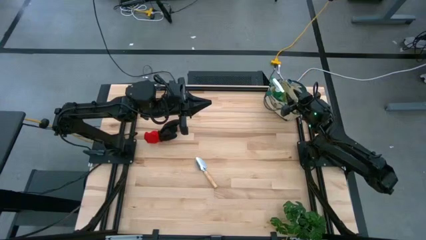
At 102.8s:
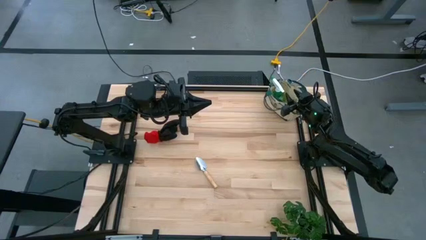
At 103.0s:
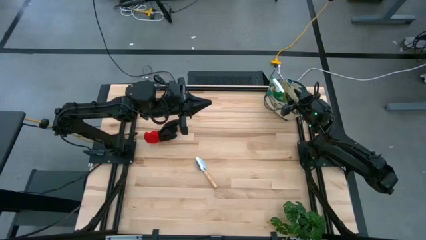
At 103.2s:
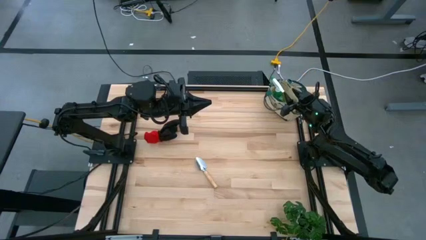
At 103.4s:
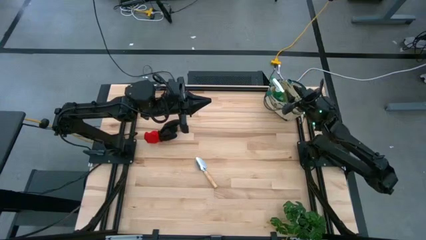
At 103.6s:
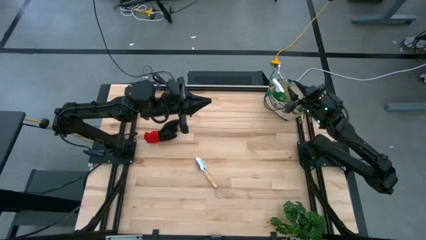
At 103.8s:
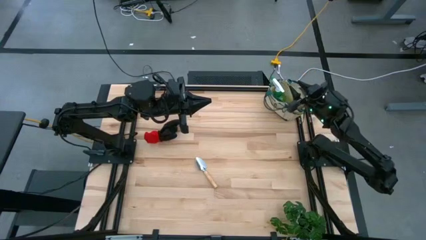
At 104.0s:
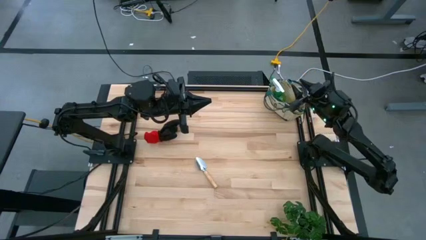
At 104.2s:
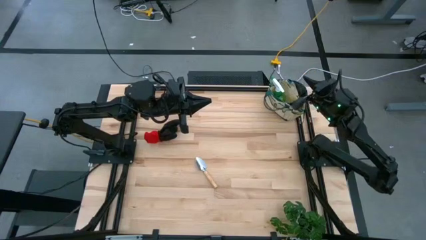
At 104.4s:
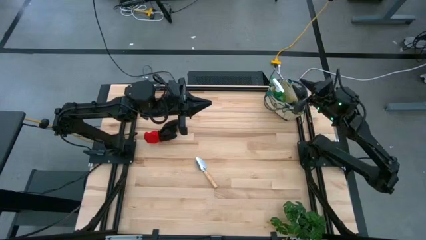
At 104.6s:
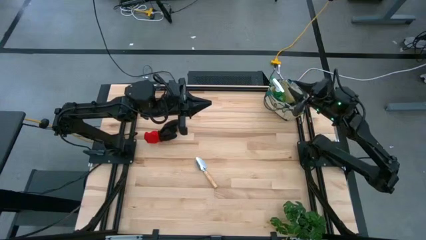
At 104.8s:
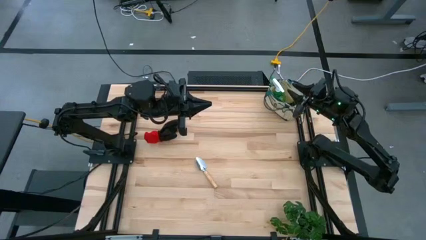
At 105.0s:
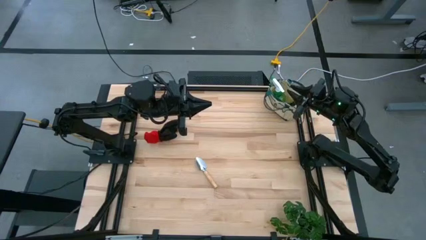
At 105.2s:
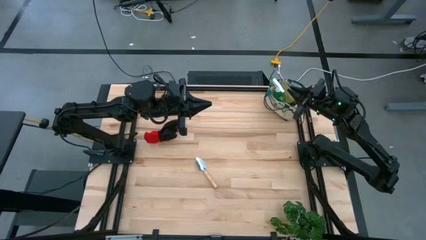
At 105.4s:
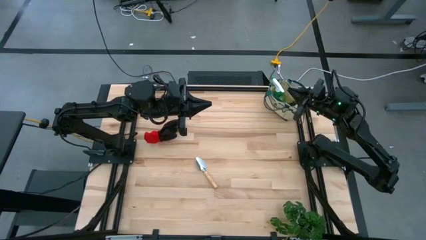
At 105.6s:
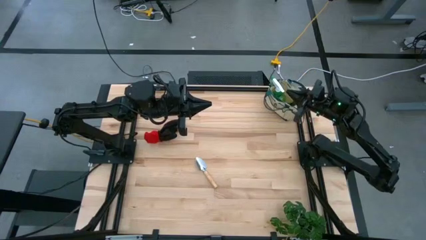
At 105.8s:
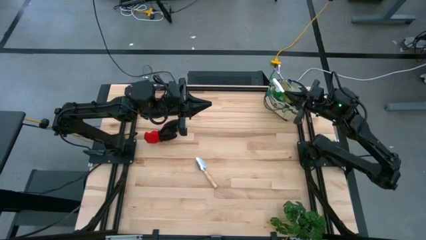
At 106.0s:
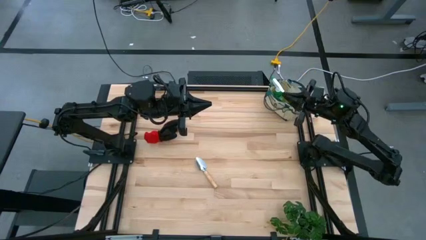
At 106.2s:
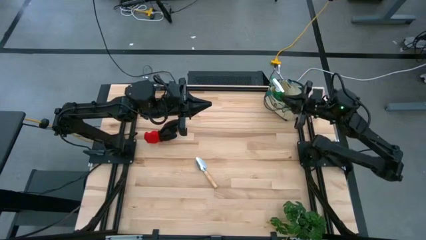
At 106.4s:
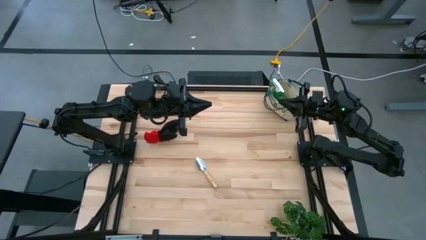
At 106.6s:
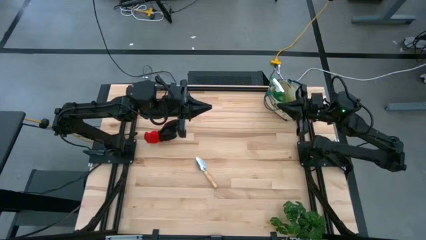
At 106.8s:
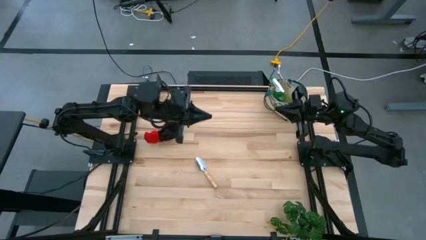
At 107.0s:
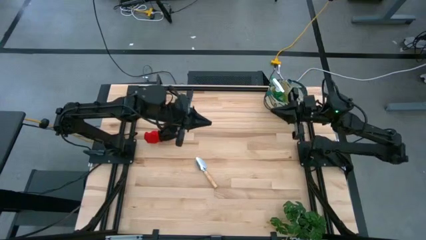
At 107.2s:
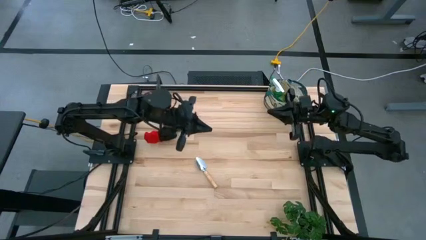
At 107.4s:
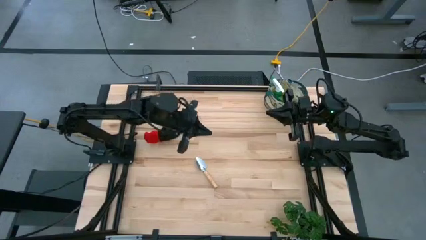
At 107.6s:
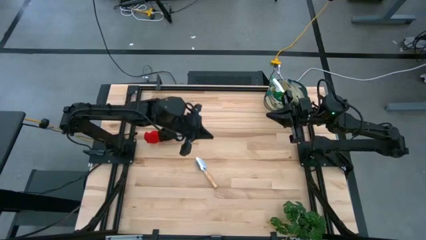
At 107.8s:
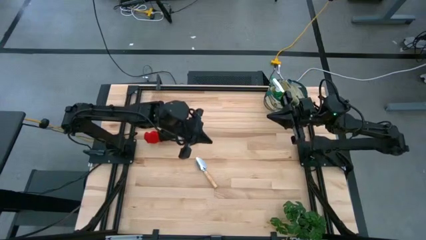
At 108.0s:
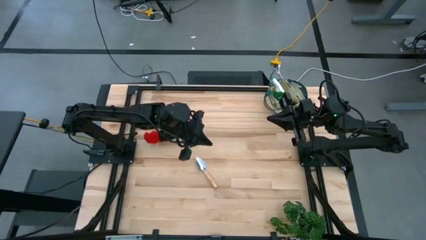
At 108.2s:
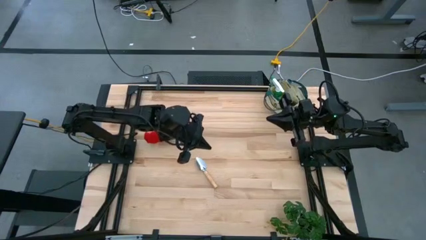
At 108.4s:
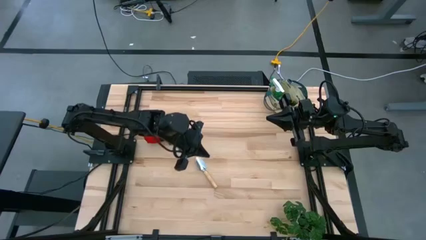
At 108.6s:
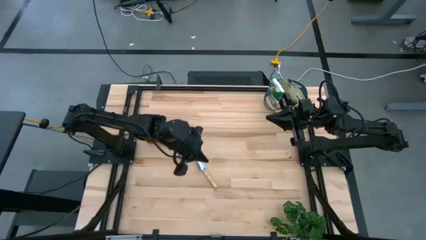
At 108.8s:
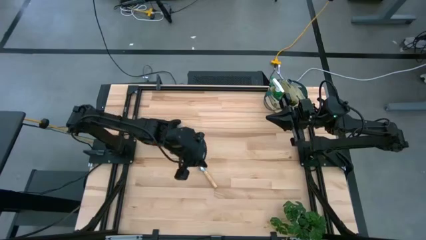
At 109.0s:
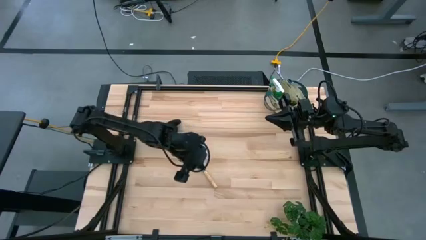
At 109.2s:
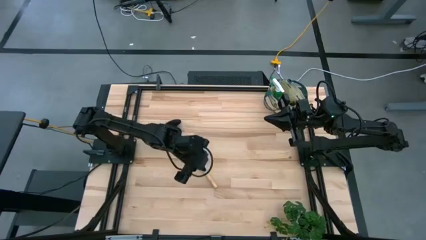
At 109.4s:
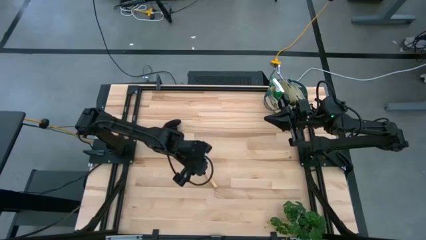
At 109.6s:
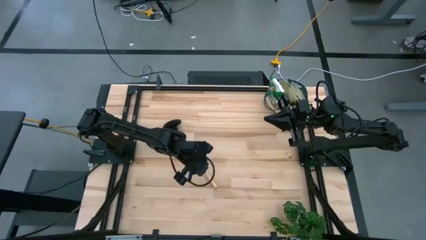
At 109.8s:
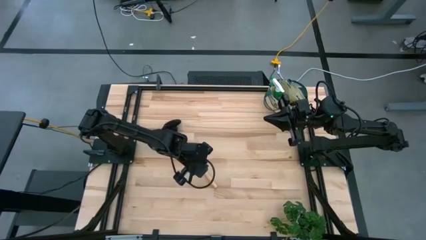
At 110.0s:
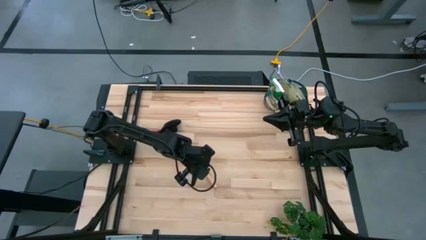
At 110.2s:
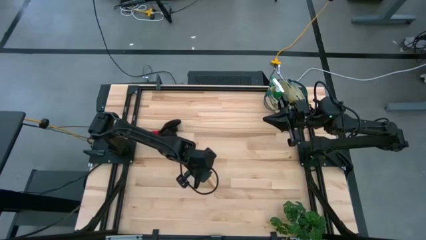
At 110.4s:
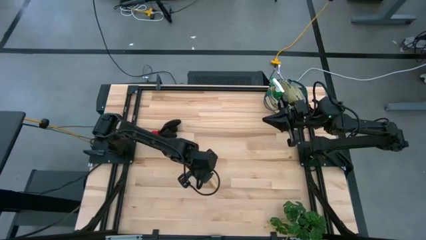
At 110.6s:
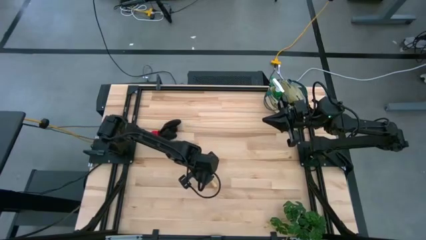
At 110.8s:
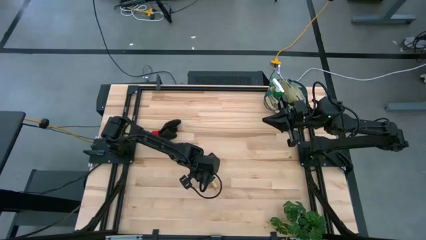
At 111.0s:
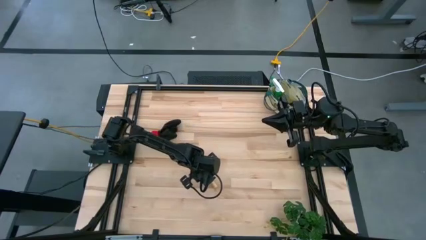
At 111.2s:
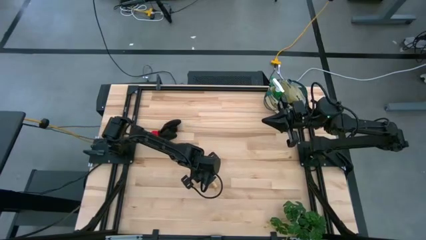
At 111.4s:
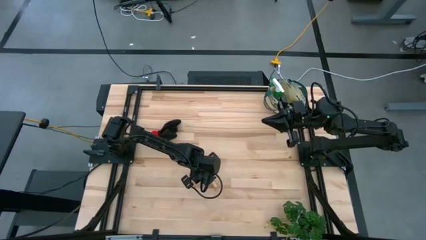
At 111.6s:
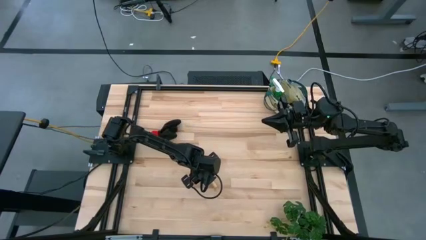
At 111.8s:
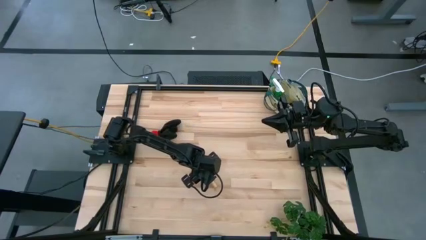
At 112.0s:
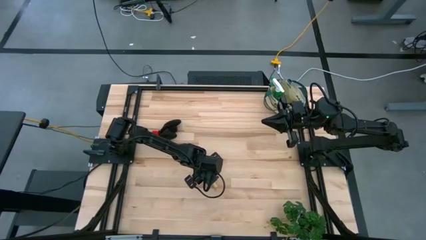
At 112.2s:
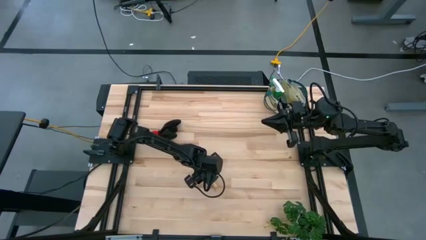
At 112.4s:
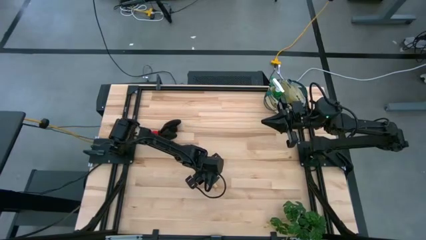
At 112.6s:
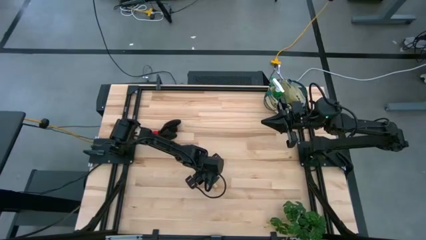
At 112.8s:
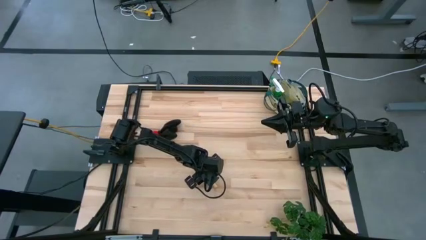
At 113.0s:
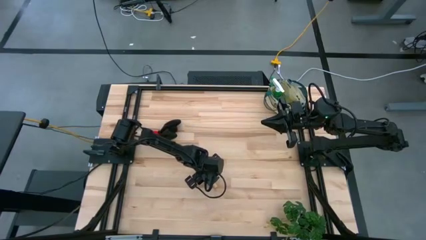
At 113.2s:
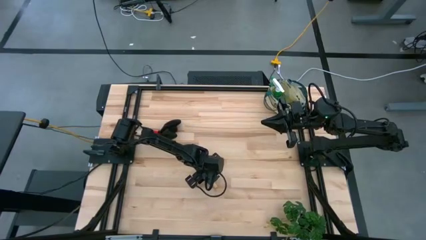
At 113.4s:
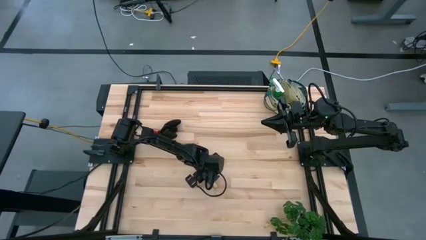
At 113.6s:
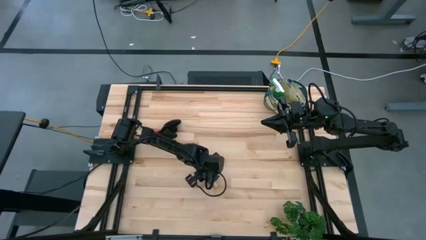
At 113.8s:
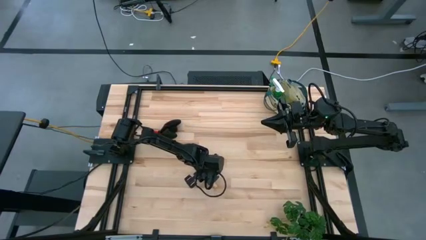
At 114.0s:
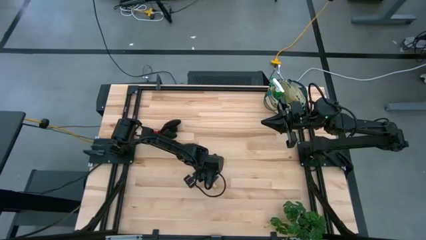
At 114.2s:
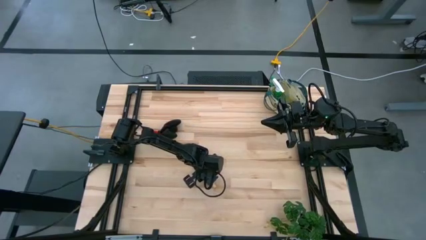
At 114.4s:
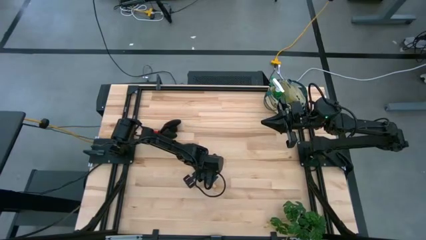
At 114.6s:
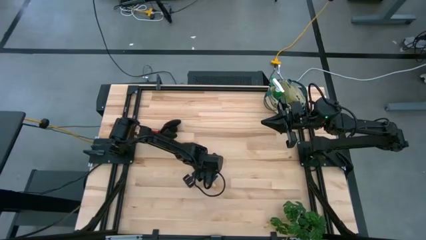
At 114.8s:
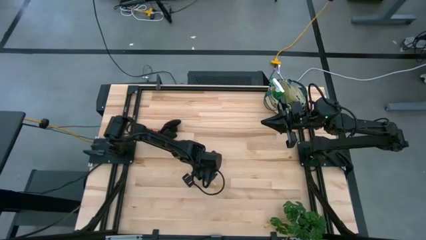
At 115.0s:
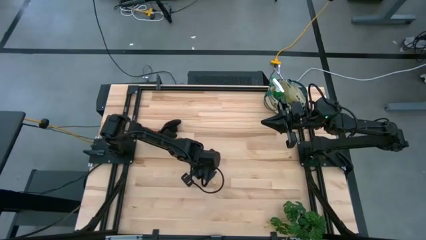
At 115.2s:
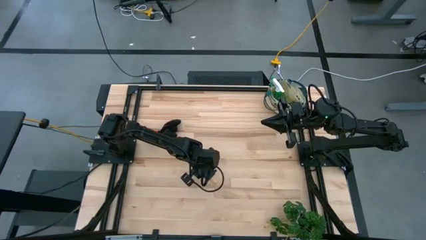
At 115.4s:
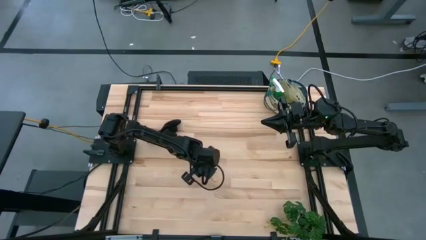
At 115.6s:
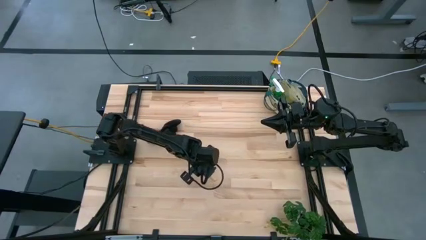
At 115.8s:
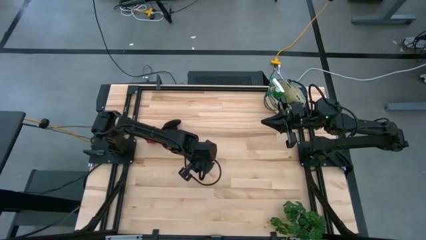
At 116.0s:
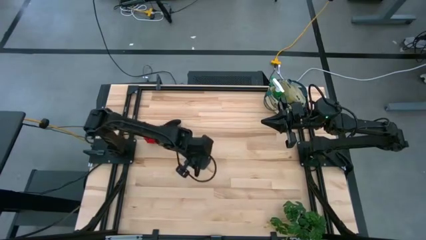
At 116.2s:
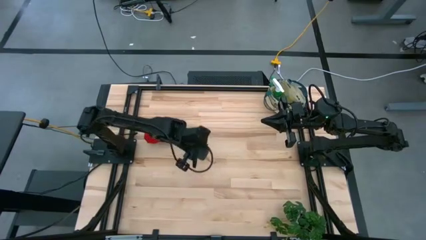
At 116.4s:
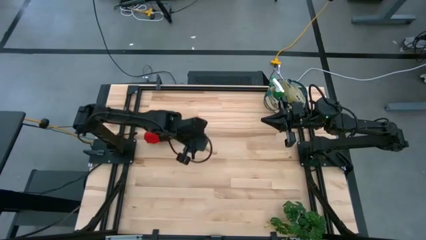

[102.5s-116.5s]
Task: Pick & Place Garden tools in Gardening bag
Put the trowel into the gardening bag
